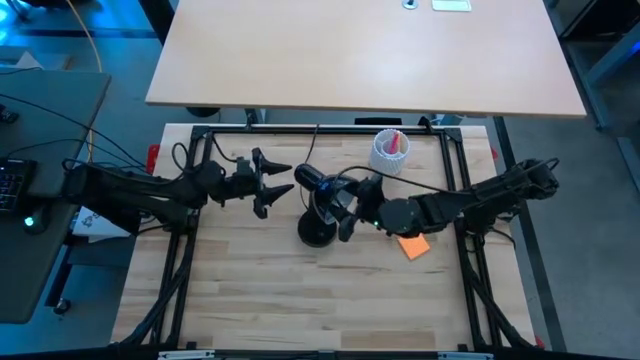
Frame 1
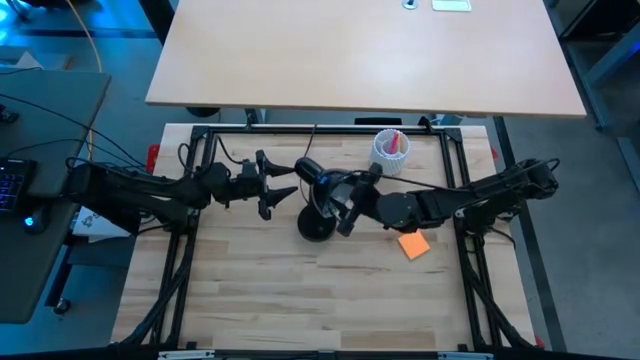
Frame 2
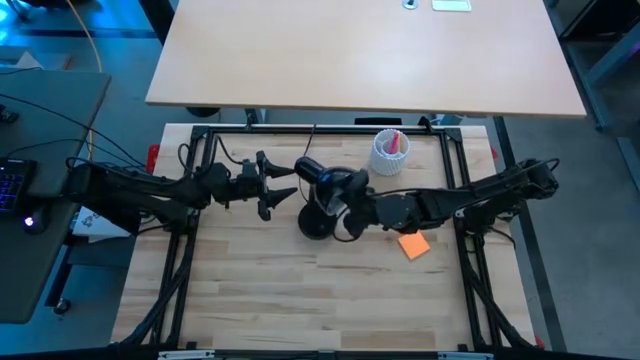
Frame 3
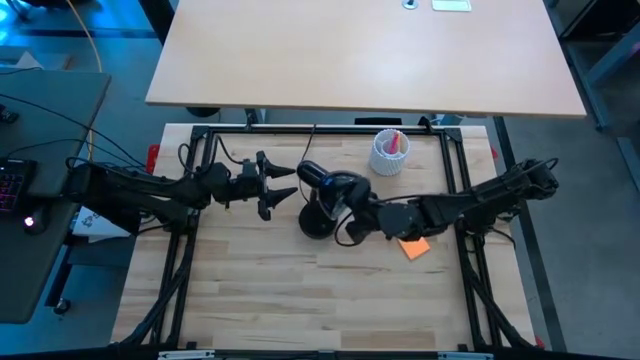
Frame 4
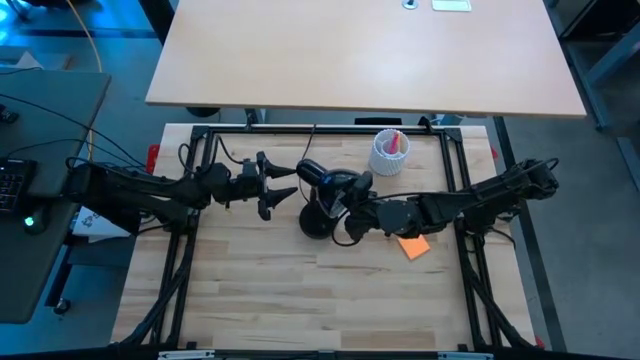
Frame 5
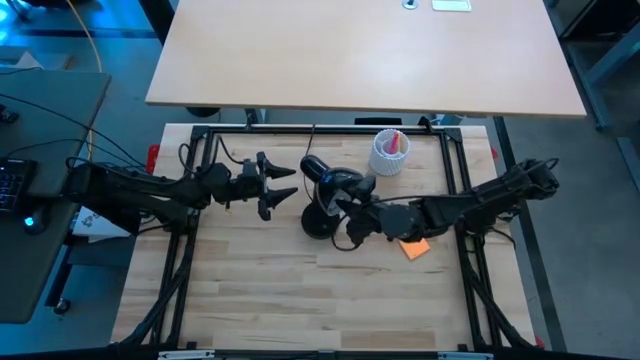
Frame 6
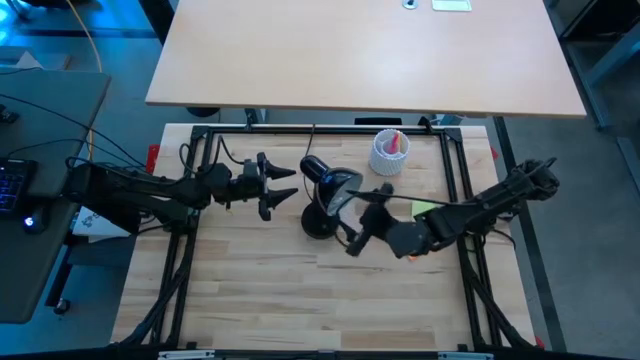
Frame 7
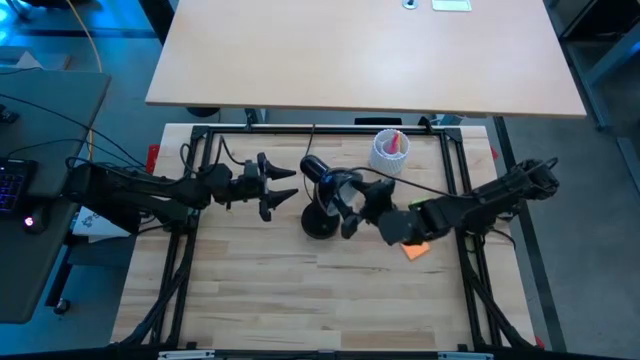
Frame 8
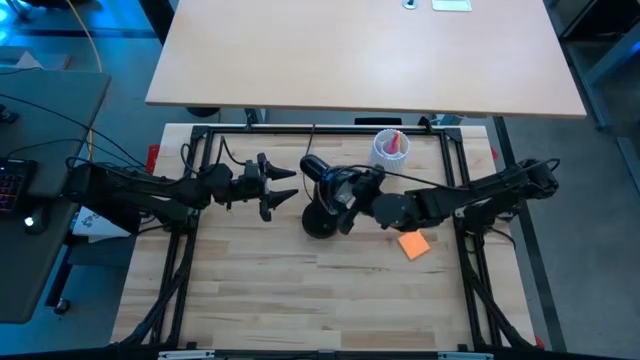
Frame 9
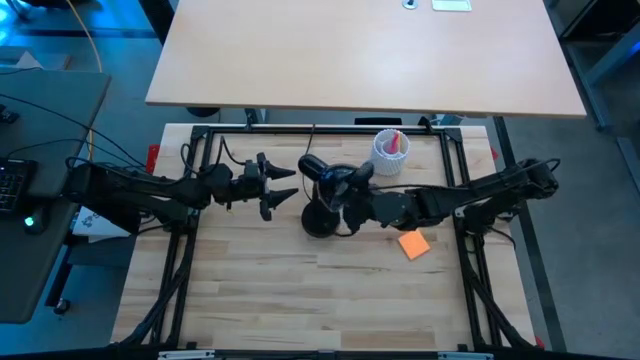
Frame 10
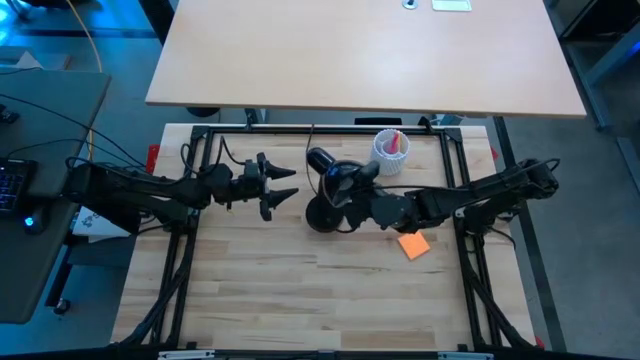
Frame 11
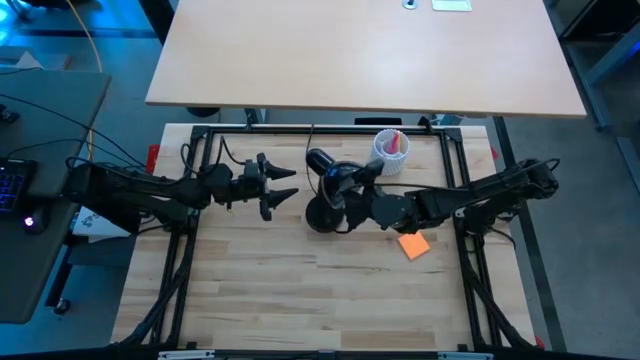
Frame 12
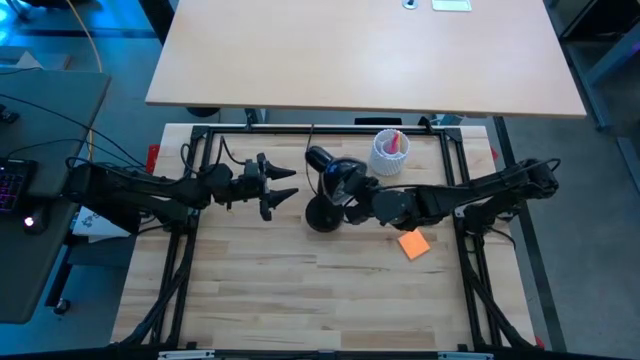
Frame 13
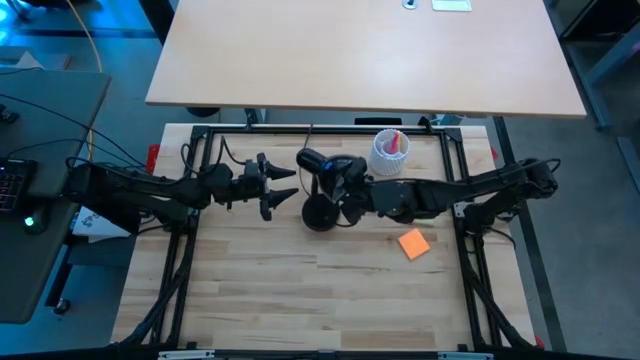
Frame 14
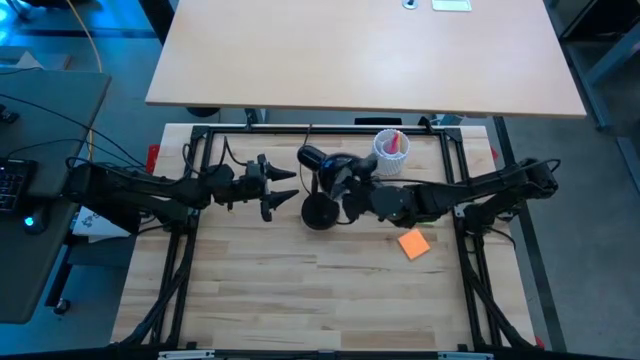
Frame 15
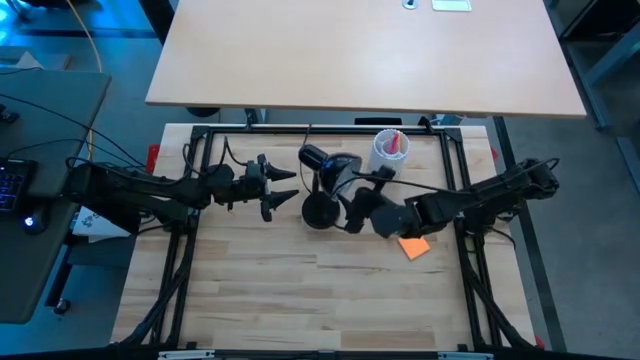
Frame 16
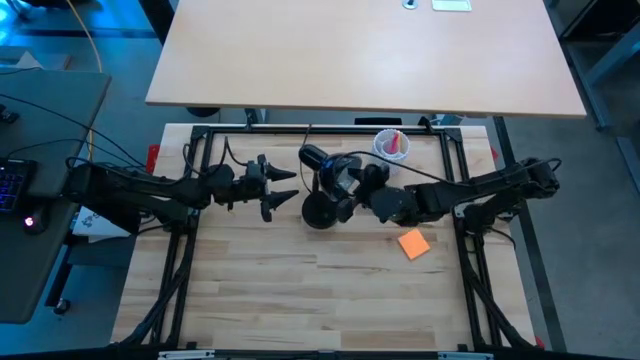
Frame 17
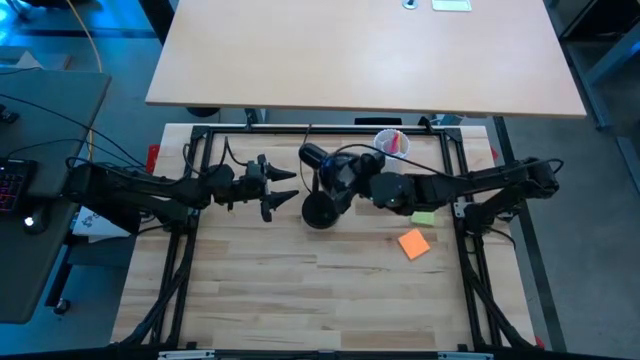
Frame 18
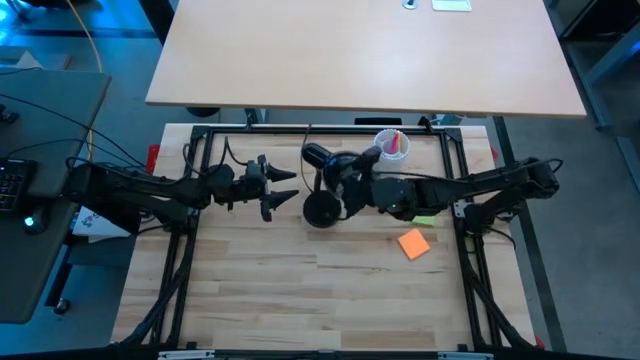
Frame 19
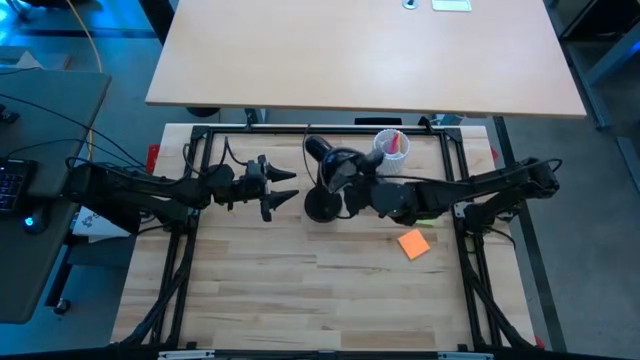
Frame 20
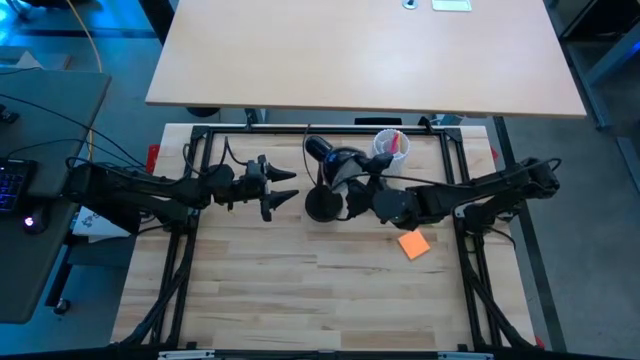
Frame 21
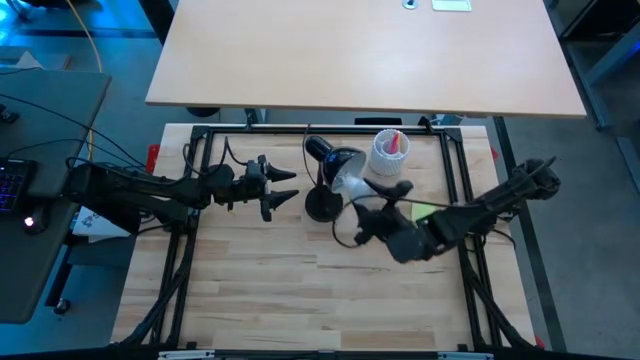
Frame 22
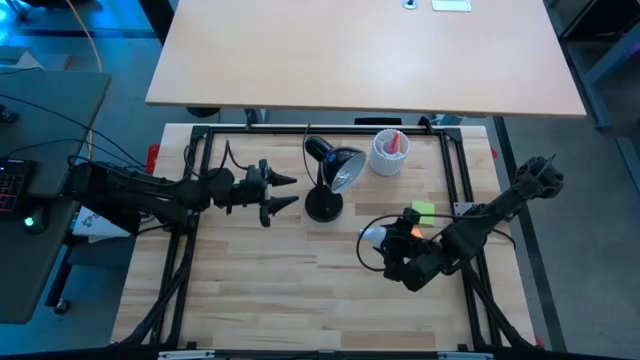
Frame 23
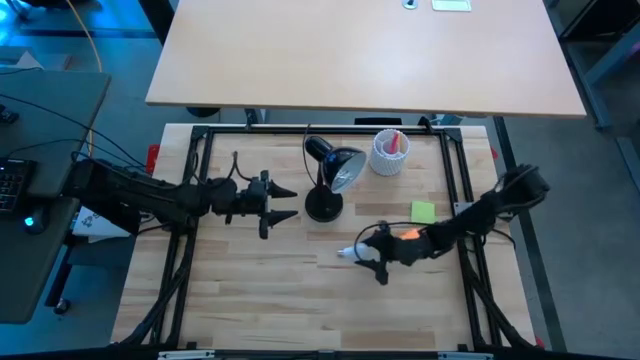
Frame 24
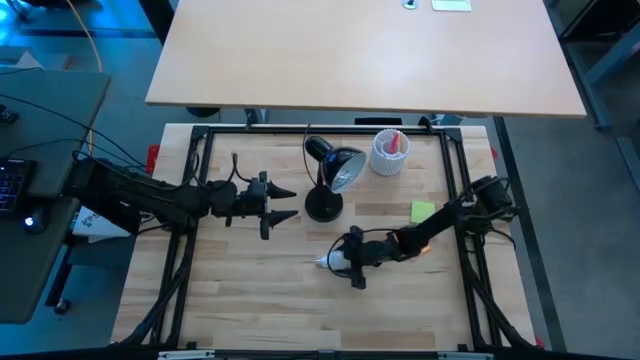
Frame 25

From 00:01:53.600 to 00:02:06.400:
Task: Screw lightbulb
Remove the lightbulb from the desk lamp

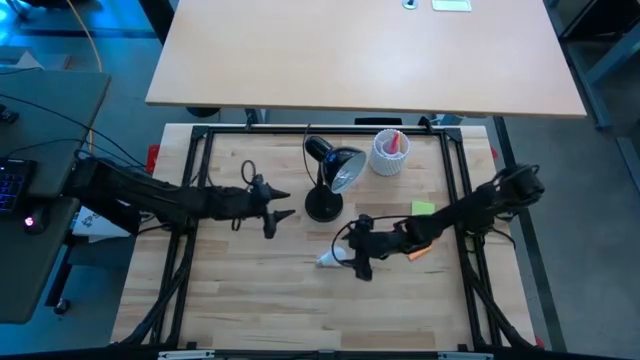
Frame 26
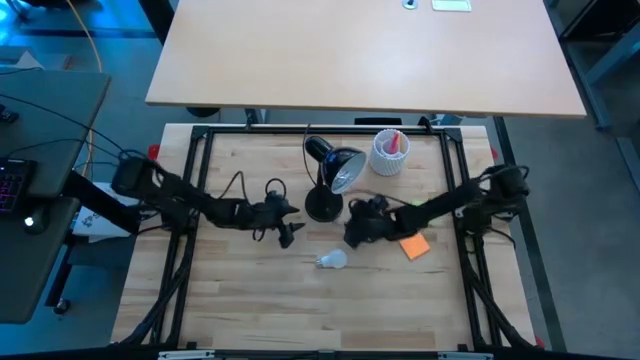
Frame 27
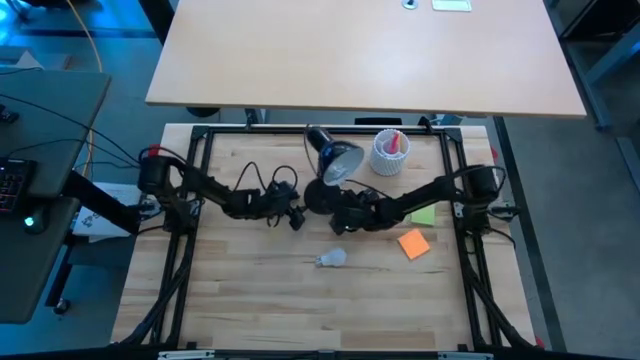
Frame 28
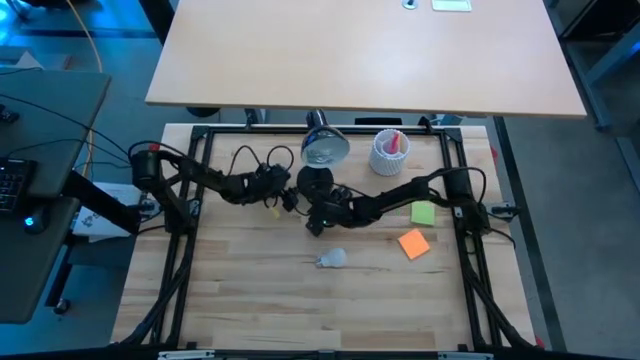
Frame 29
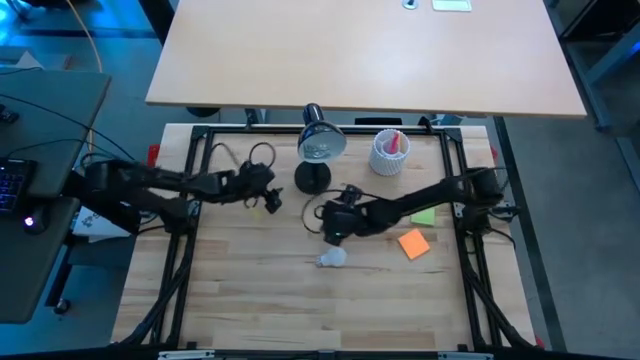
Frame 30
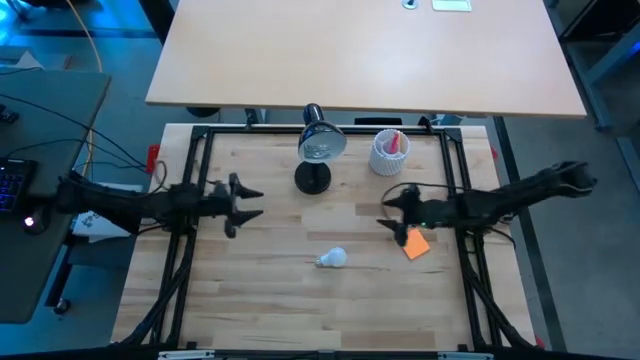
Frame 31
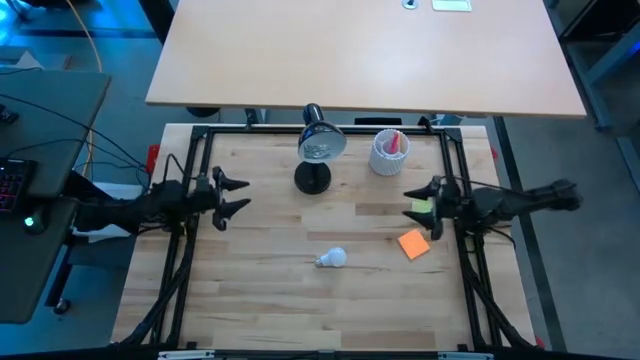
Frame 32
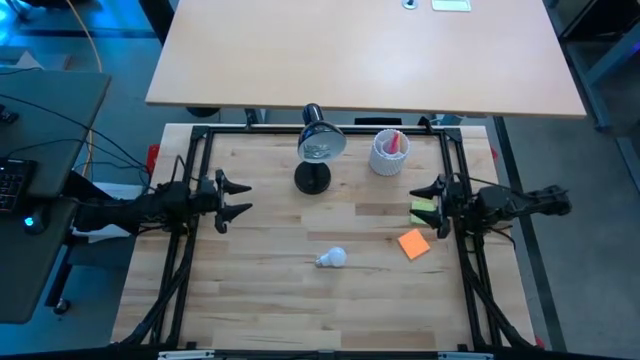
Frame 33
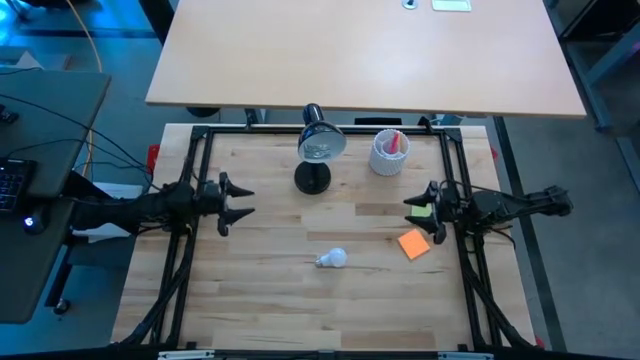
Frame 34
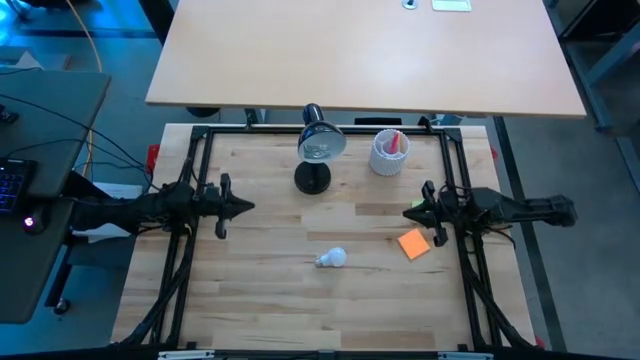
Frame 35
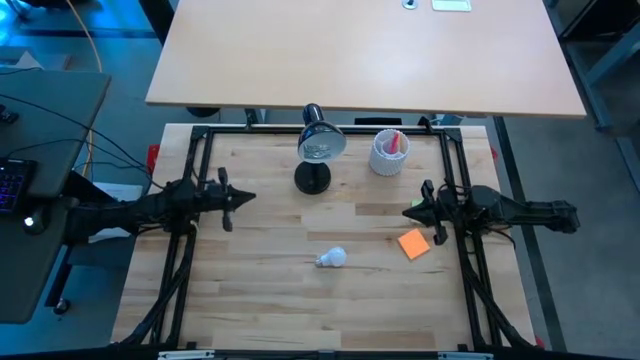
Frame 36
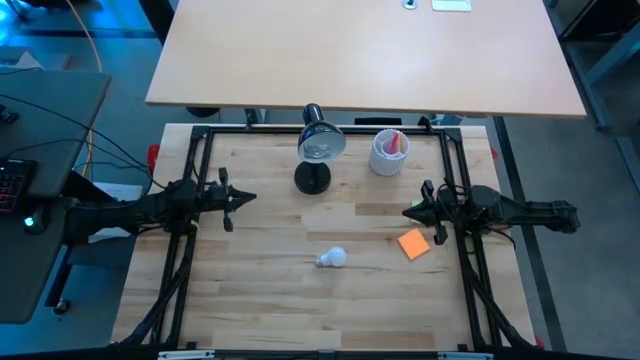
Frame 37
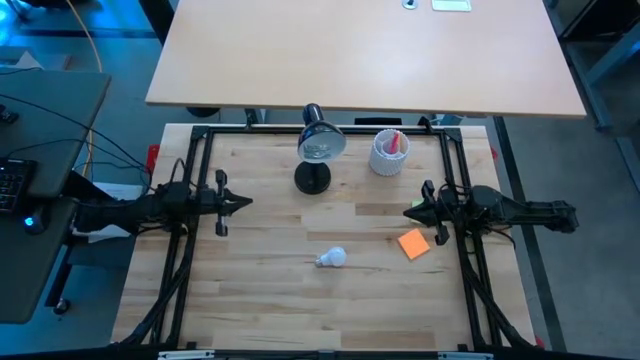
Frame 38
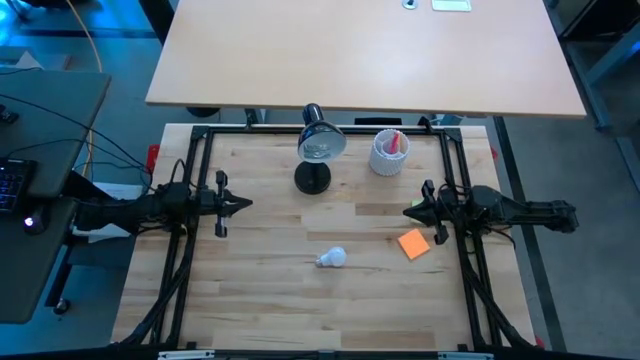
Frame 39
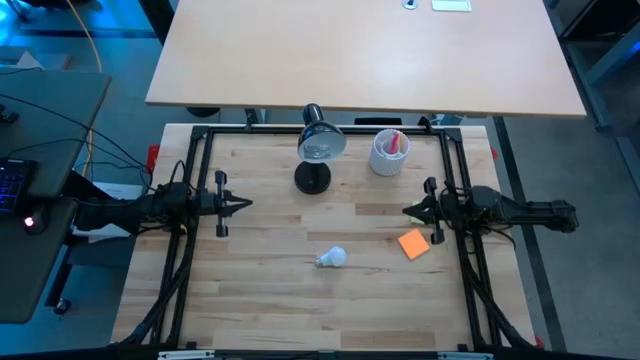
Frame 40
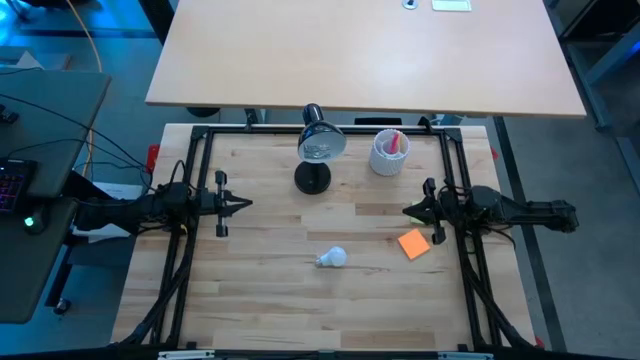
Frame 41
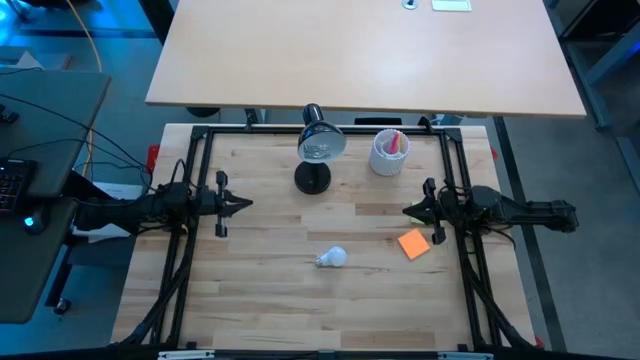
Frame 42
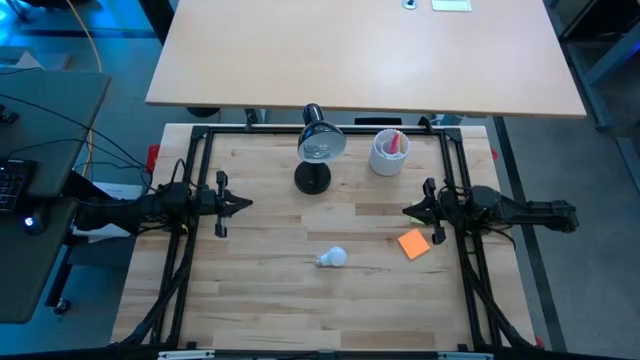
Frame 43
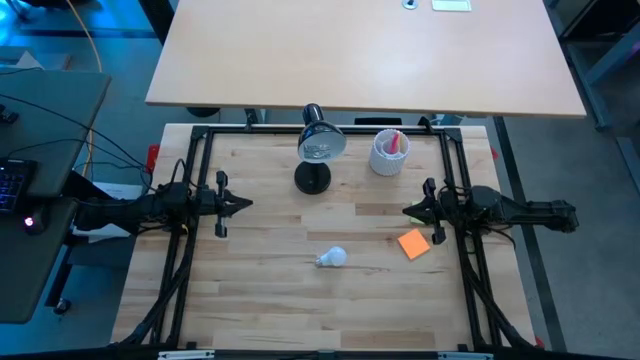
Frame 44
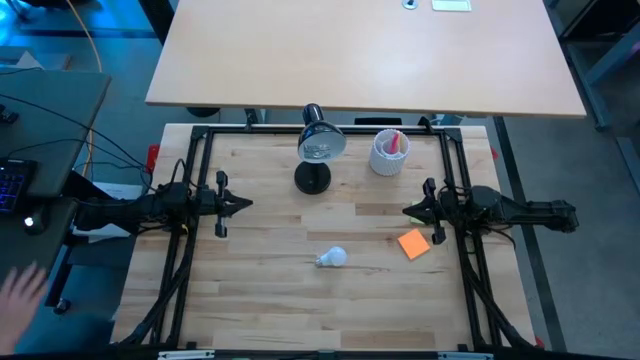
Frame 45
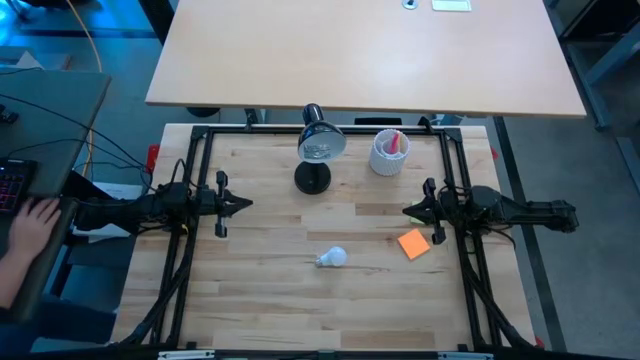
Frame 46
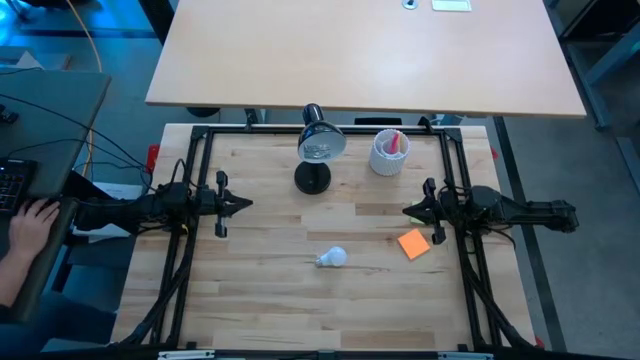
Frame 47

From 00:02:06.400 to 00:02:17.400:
Return to Home Position
